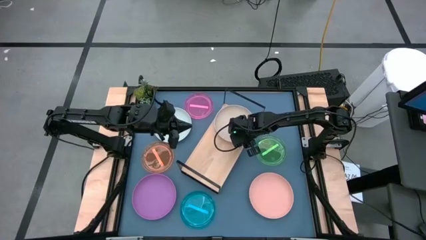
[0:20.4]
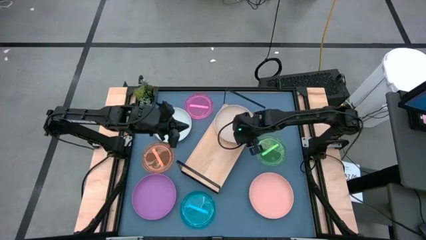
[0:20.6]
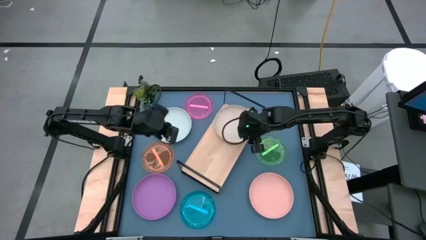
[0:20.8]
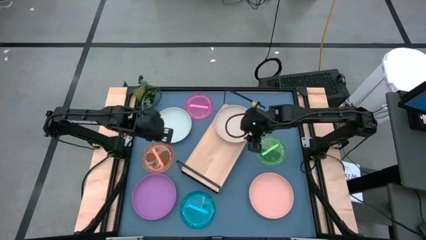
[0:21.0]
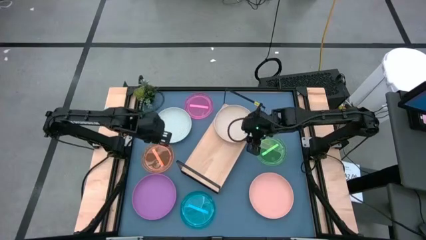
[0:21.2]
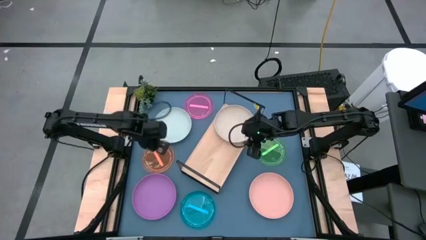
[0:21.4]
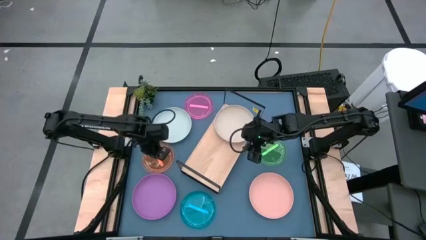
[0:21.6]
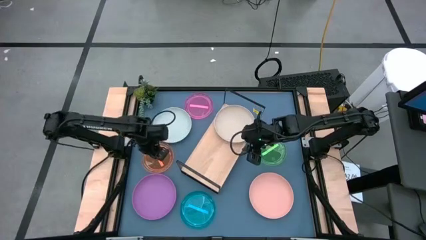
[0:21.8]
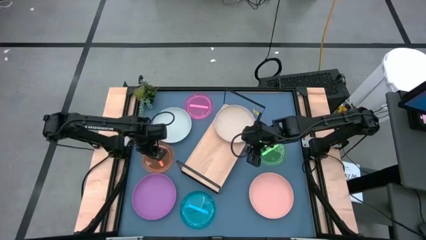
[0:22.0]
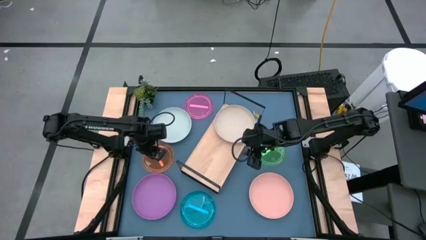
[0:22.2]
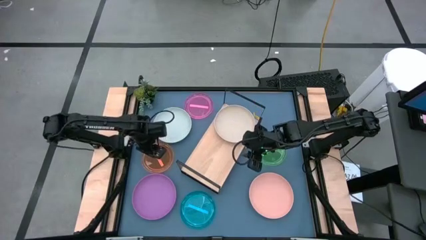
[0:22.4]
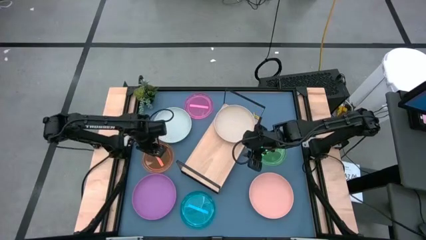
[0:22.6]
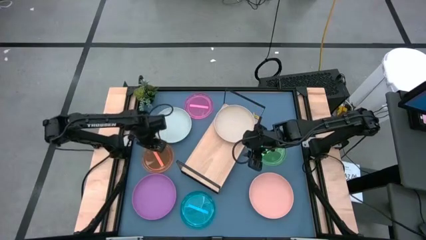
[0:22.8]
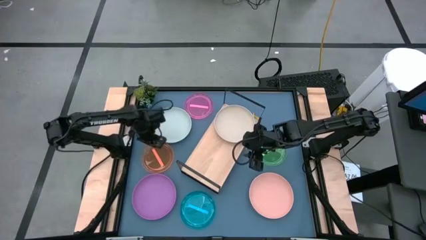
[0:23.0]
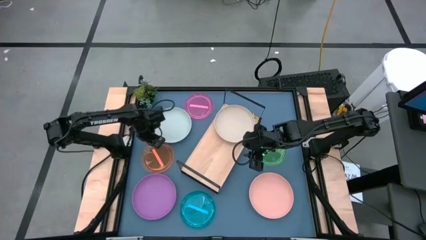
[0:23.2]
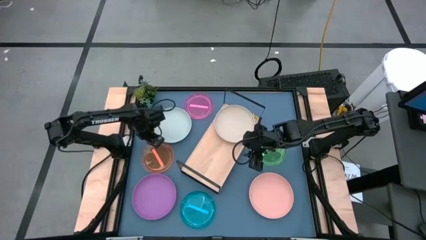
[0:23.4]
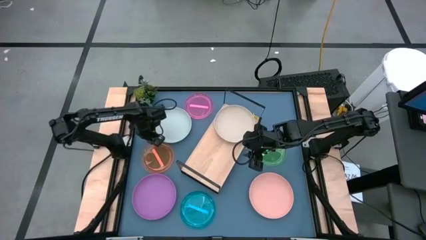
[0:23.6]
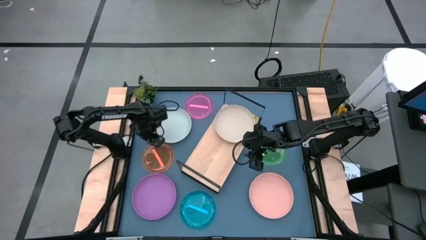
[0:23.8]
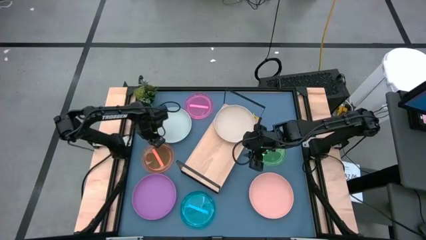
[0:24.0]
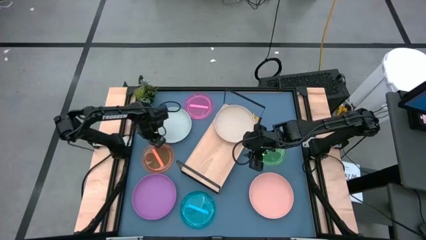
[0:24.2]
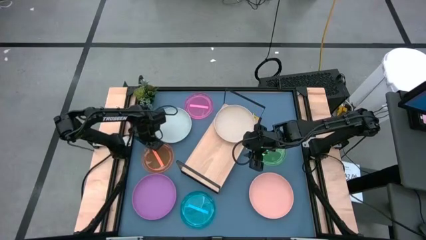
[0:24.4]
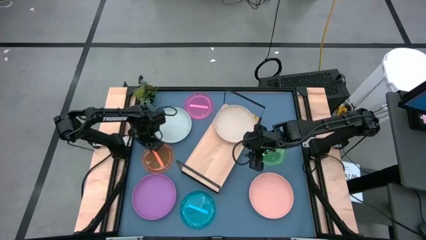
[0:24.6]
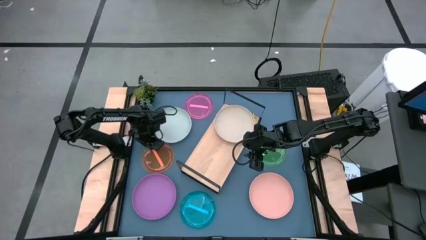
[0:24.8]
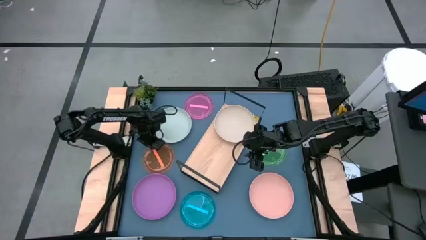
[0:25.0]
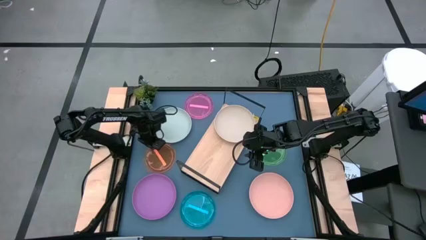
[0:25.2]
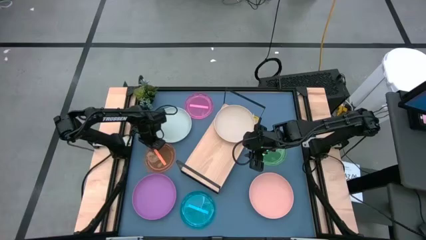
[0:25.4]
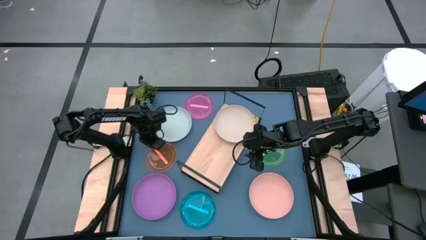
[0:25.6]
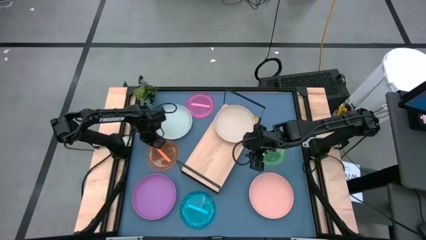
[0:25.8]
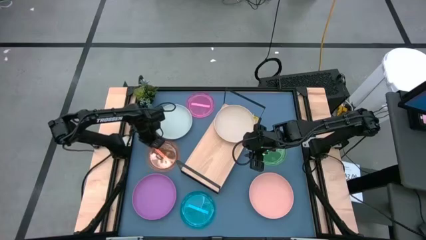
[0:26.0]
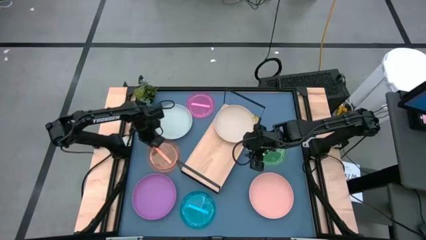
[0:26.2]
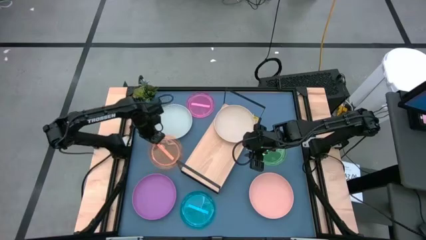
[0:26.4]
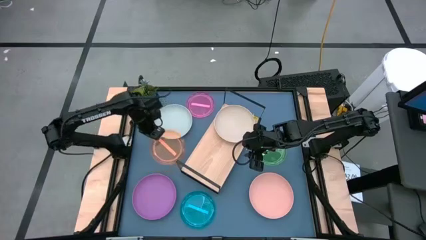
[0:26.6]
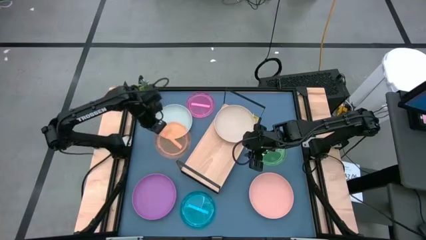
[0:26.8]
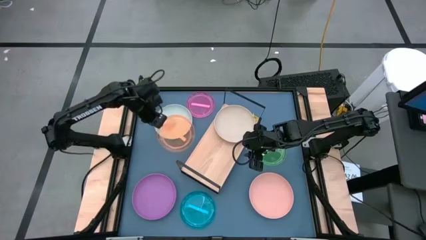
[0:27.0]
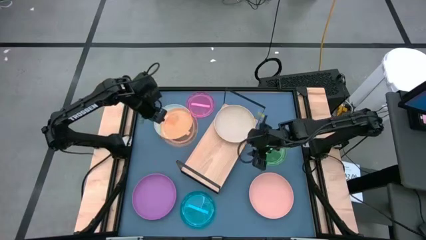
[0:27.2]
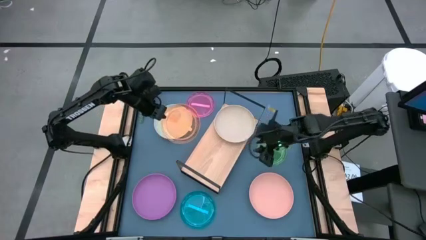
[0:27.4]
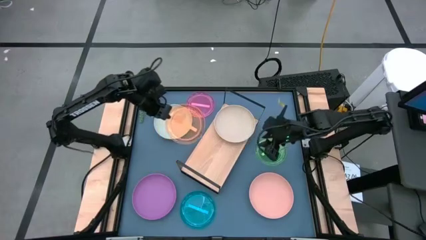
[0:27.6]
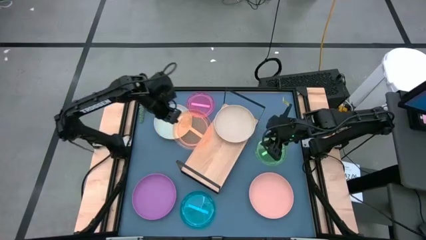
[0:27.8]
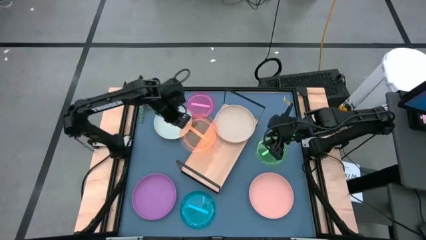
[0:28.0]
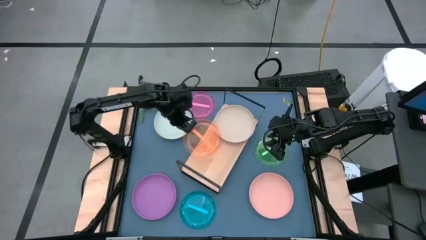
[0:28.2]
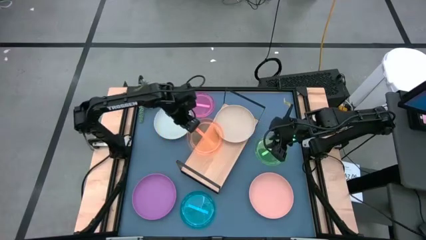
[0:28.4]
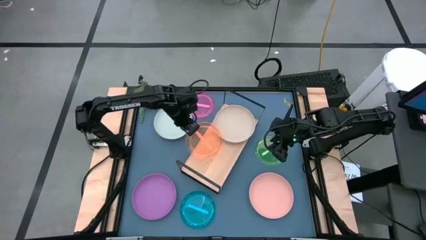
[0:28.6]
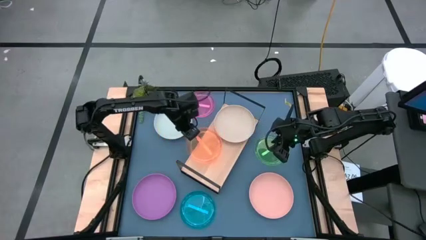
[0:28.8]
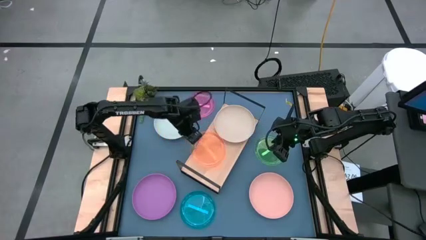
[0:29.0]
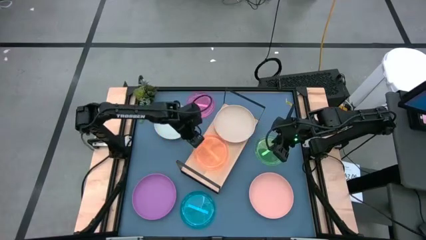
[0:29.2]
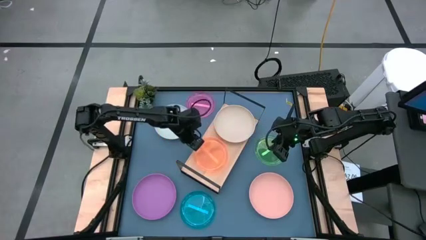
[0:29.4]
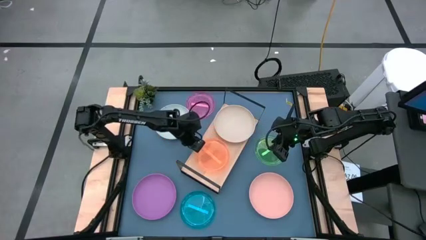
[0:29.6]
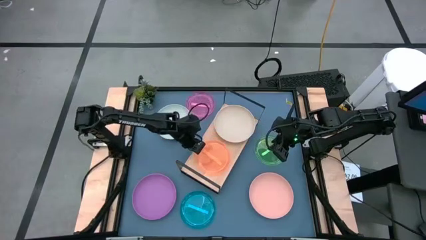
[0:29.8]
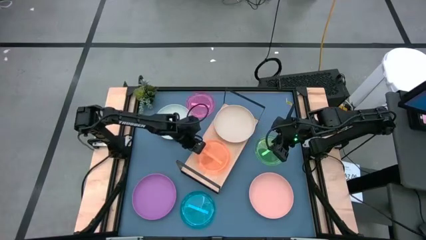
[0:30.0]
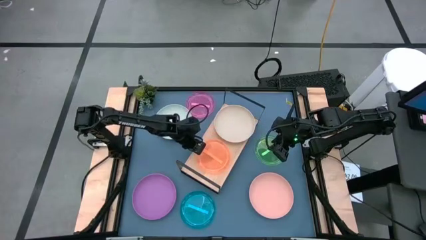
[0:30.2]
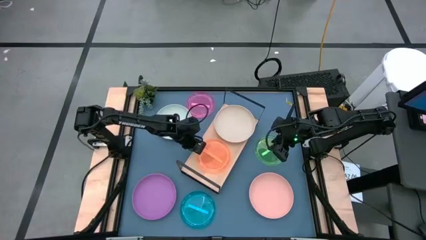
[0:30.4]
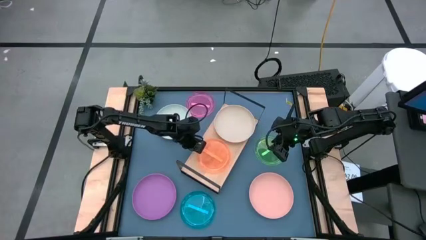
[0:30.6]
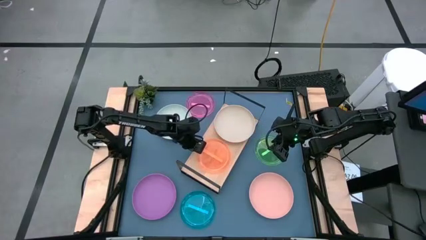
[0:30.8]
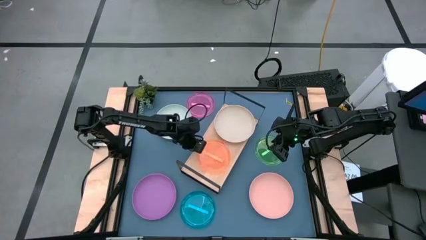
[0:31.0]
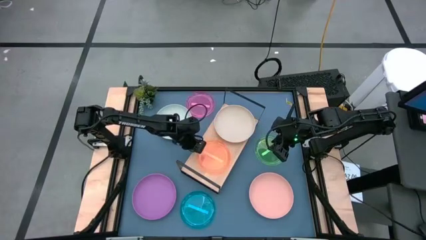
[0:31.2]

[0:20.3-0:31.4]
Task: Place and stack plates onto a shelf
Put the orange plate on the shelf
